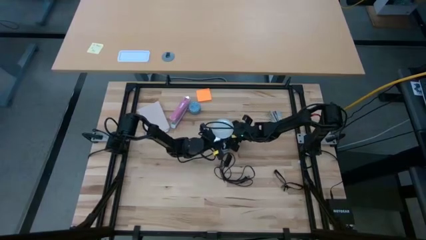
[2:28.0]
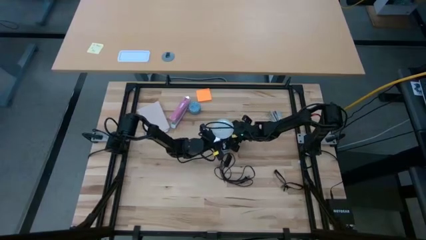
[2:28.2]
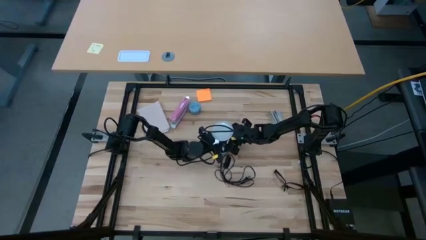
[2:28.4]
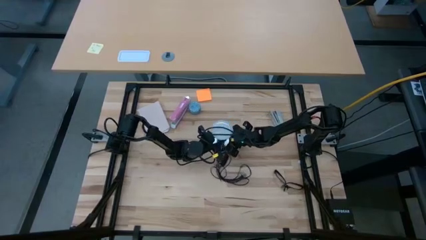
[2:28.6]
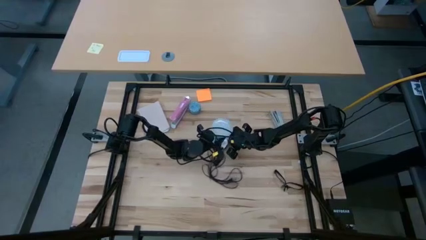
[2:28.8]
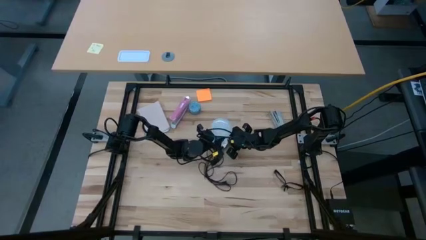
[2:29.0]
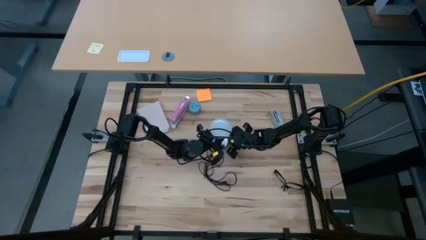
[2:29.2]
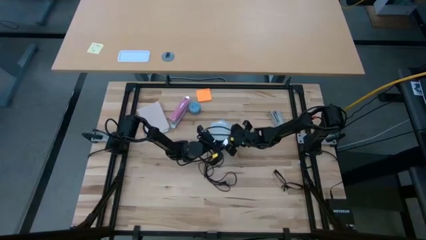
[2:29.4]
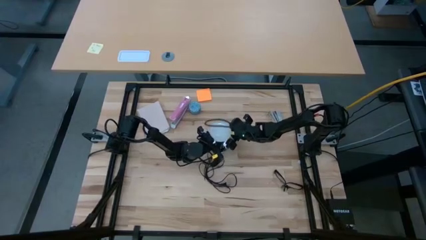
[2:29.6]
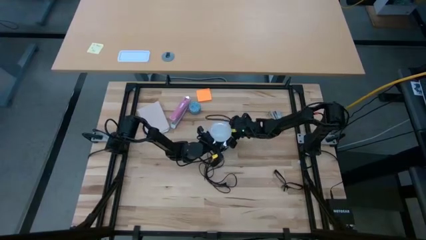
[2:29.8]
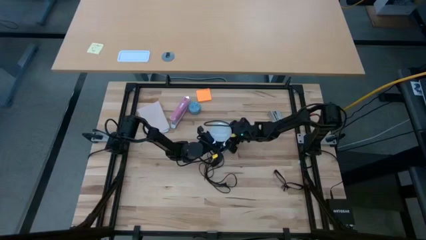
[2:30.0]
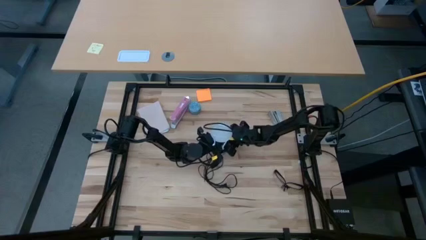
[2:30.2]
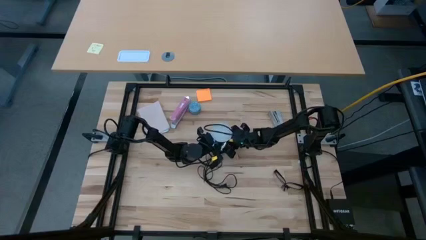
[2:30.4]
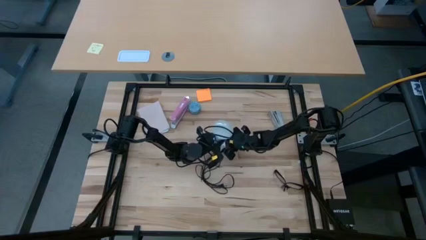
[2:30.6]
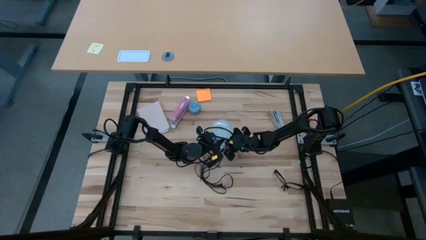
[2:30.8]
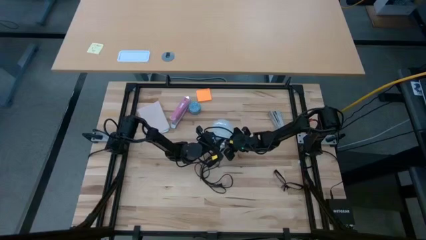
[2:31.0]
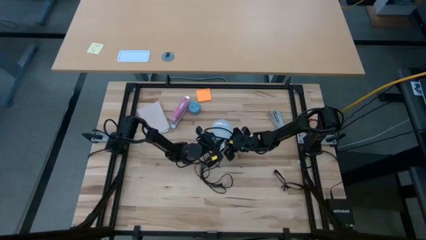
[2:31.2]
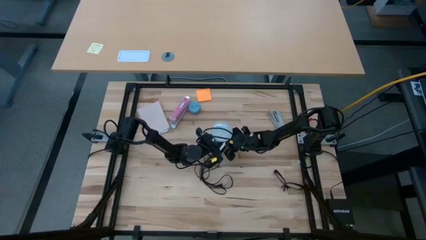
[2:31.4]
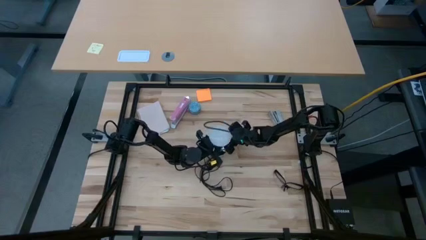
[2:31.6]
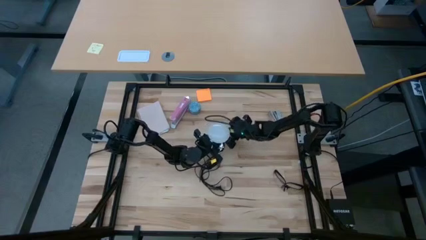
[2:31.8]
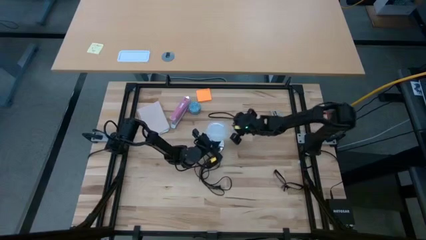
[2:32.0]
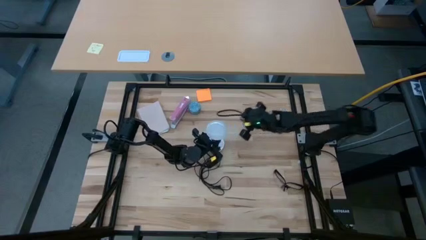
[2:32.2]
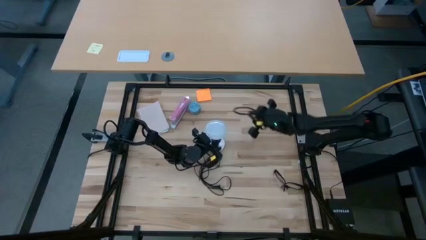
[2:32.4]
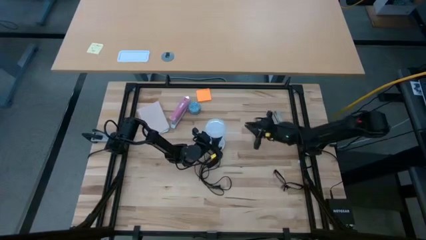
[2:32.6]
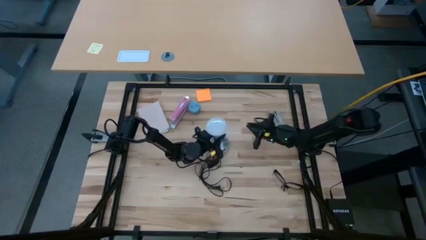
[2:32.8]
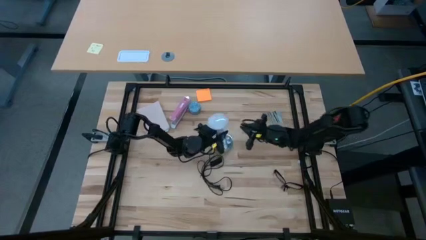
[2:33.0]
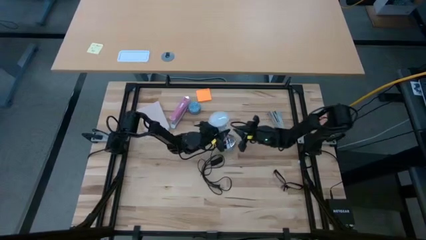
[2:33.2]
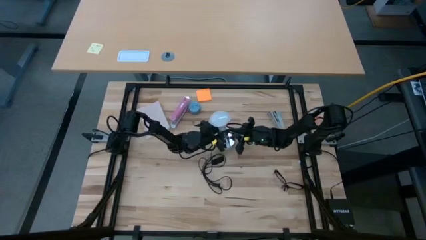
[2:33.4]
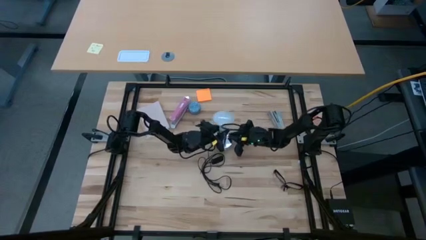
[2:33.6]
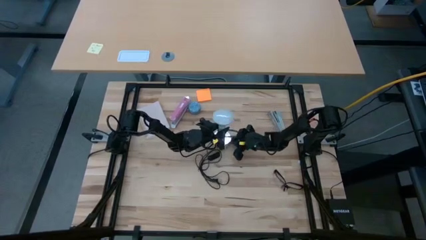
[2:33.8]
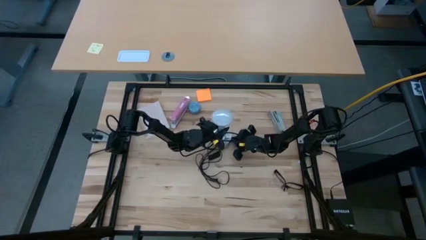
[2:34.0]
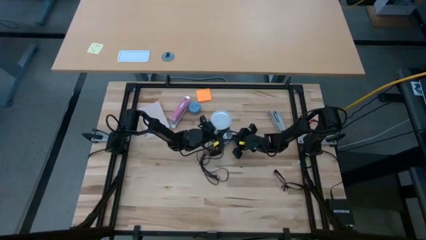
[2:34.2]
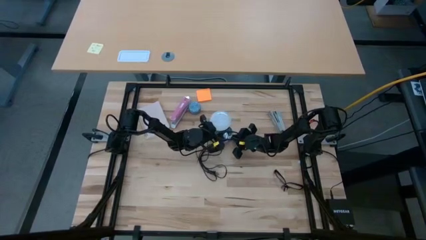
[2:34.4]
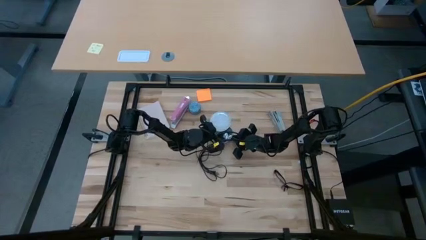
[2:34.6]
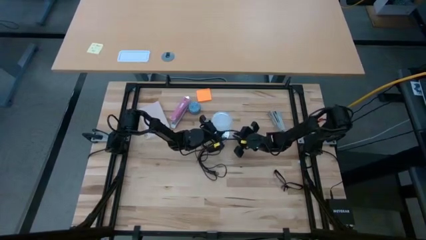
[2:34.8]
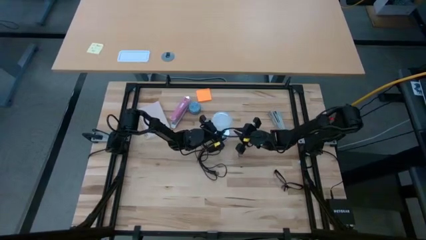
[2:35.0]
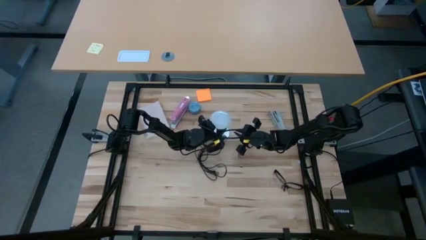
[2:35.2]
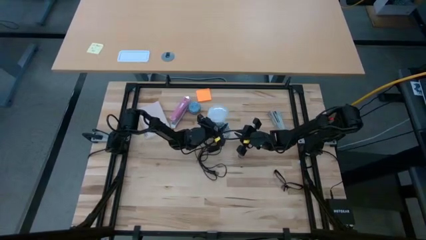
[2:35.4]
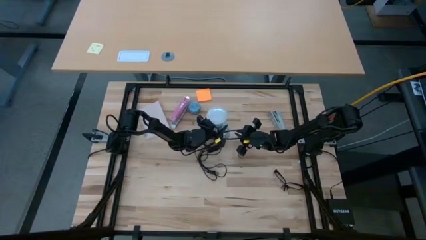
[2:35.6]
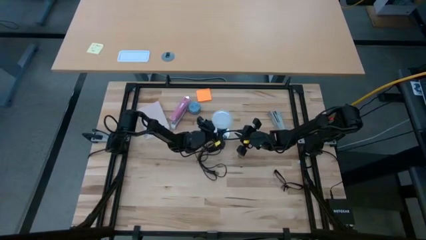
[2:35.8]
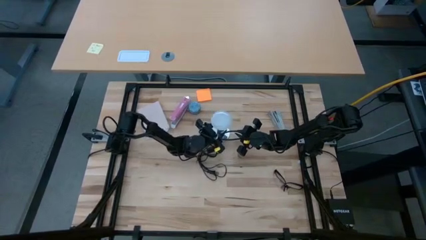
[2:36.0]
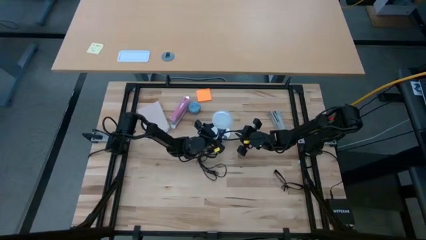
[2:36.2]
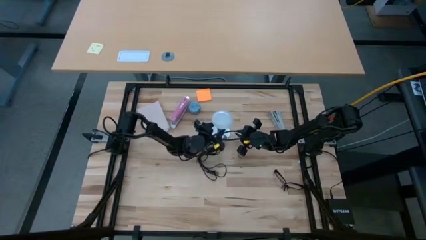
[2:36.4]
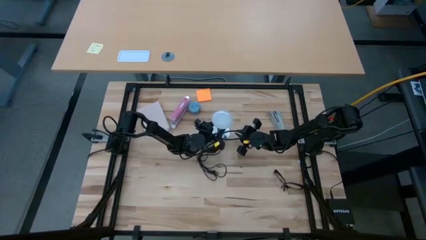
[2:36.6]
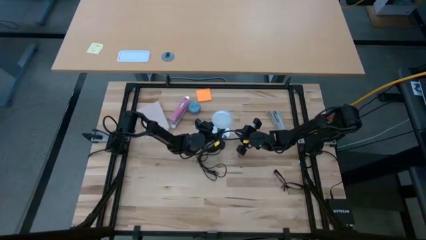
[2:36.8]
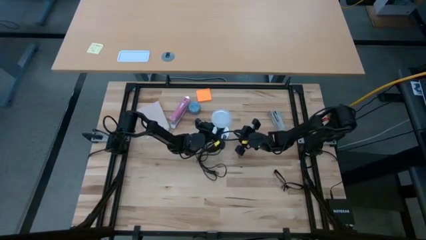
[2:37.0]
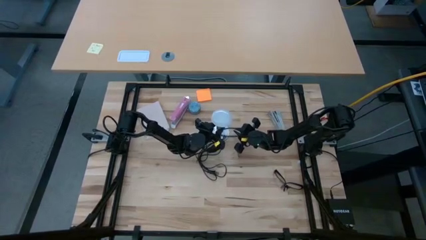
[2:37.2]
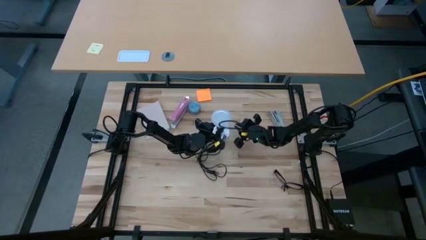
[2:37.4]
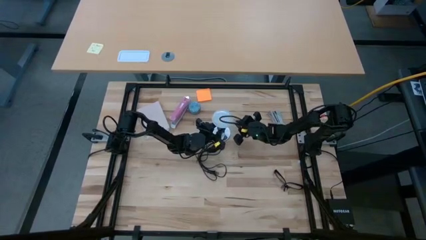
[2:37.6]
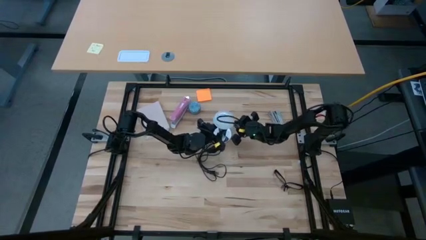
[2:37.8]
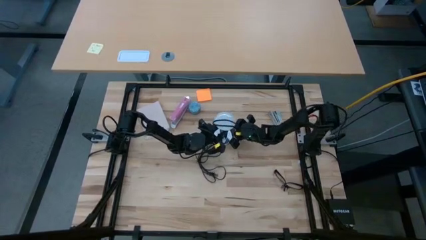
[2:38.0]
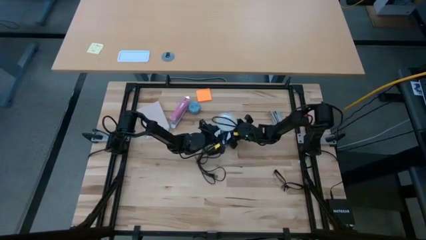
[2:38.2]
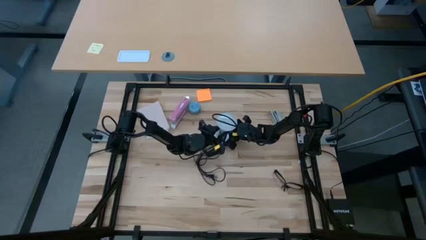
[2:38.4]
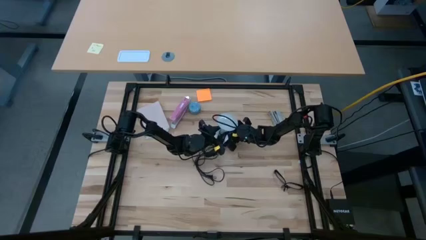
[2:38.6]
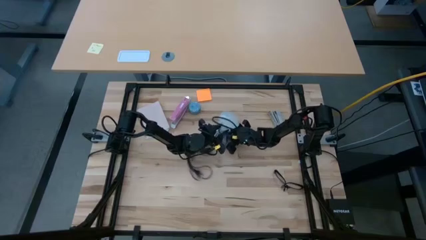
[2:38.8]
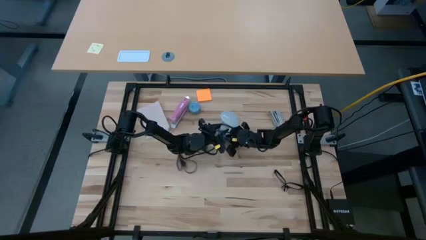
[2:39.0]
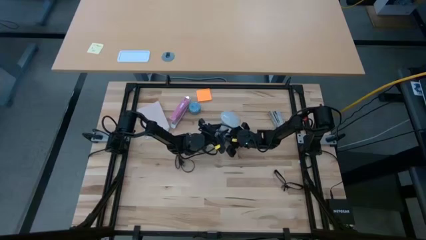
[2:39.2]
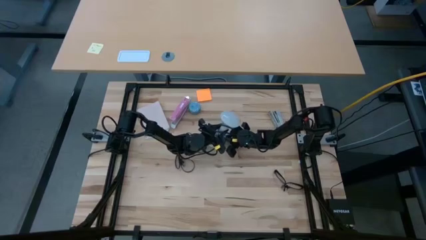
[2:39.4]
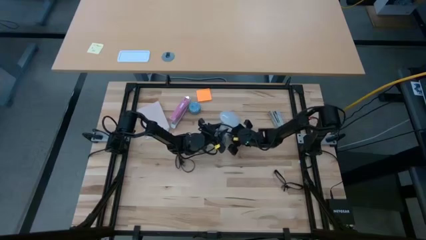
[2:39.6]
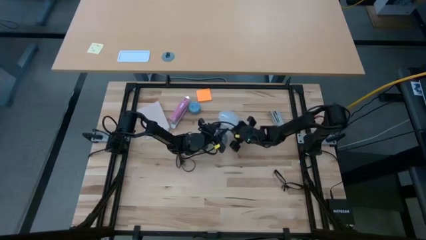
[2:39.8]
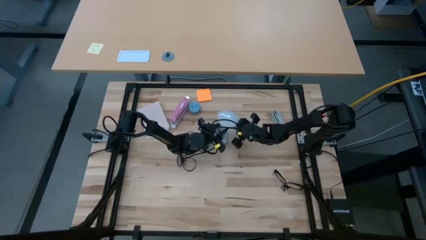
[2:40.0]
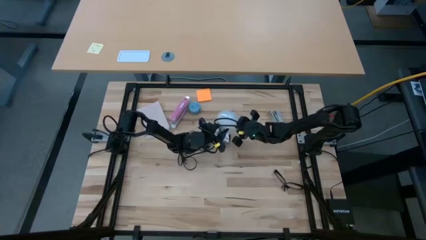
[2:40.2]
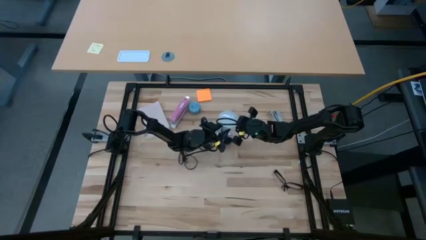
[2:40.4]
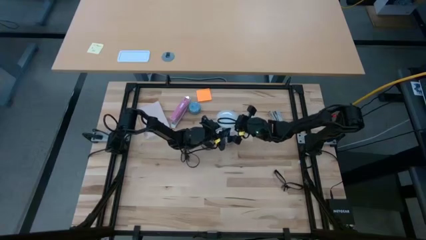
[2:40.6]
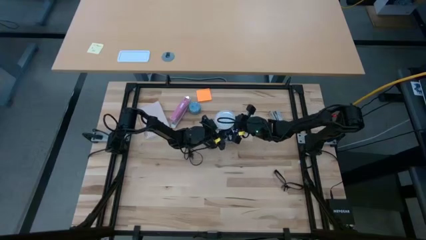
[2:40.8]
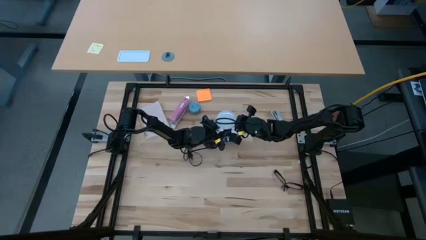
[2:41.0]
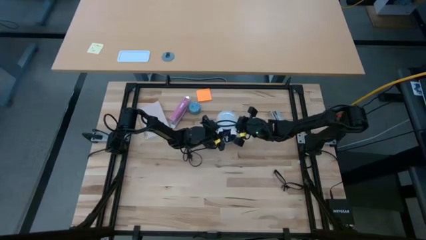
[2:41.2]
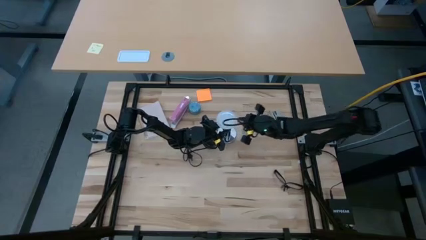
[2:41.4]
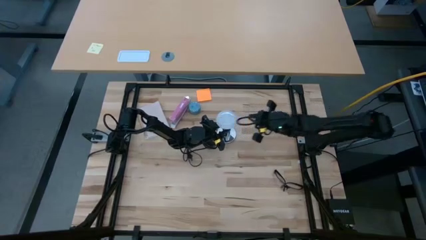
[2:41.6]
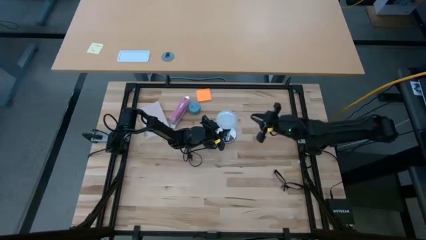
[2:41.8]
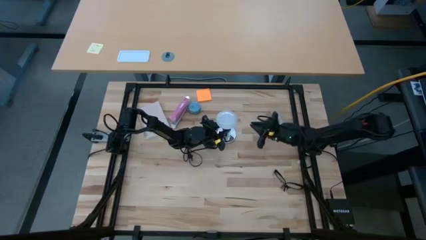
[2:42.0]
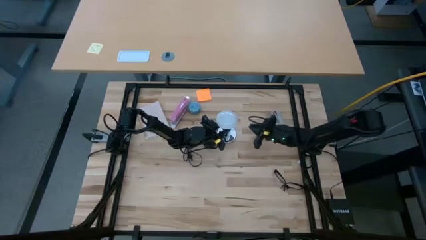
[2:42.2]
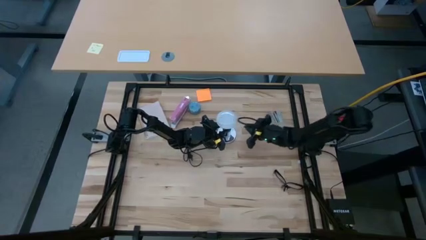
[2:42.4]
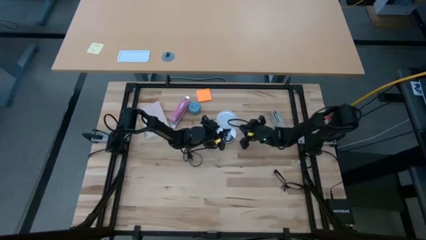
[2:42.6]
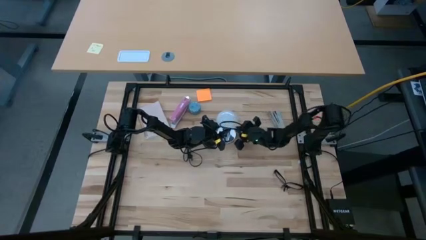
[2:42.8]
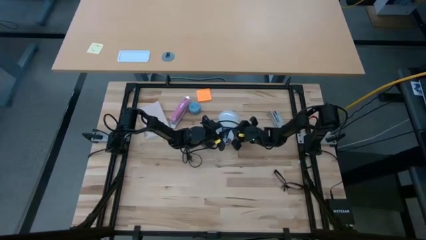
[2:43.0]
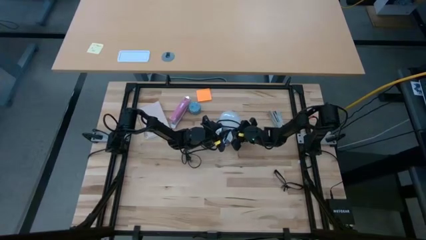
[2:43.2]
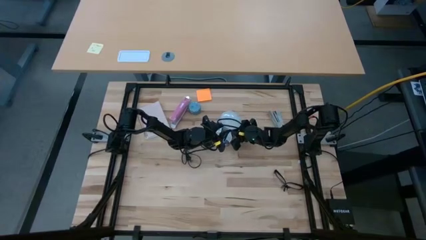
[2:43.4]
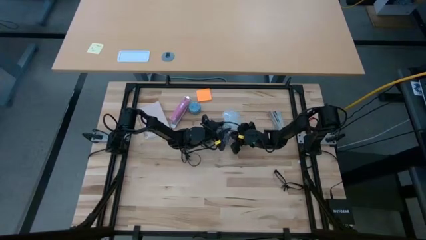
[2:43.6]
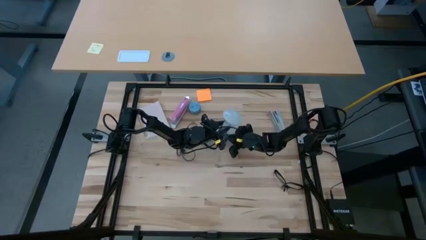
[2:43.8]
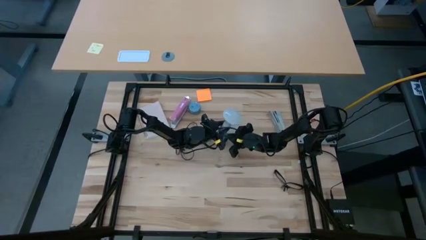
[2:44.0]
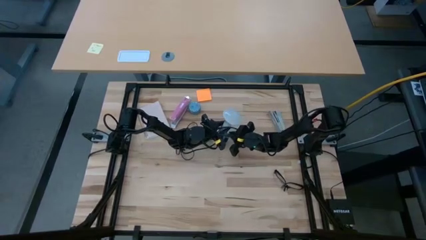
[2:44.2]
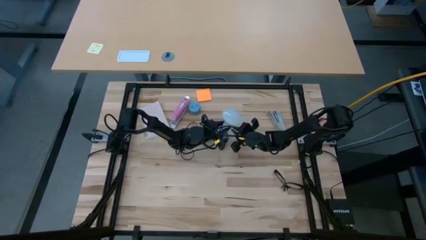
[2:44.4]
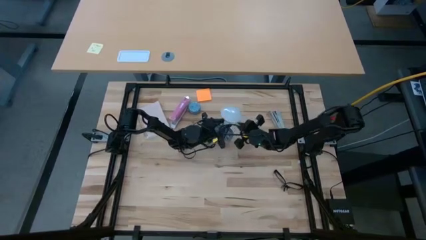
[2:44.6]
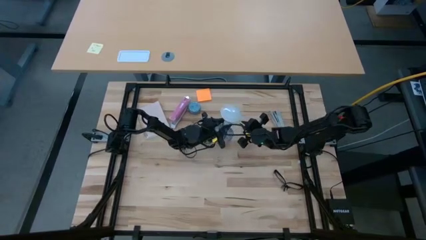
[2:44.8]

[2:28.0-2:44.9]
Task: Screw lightbulb
Remove the lightbulb from the lamp
